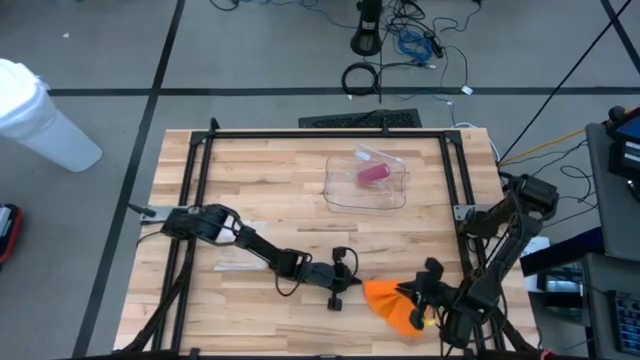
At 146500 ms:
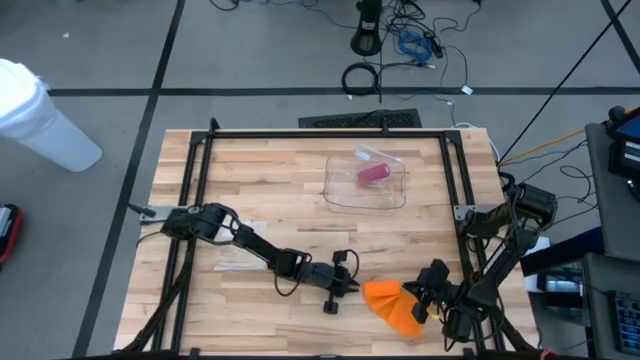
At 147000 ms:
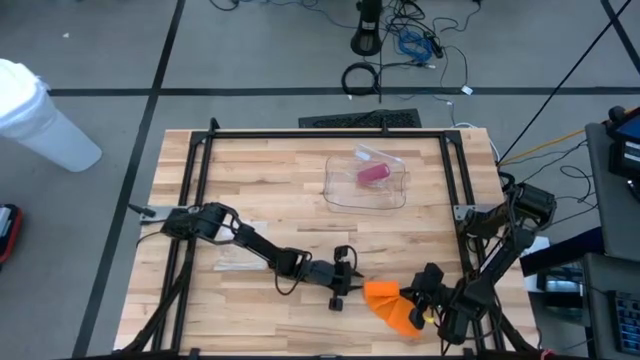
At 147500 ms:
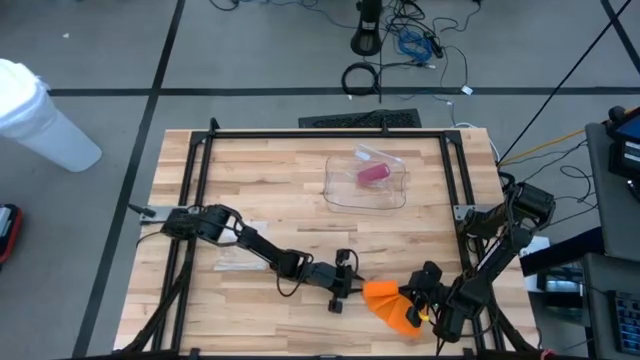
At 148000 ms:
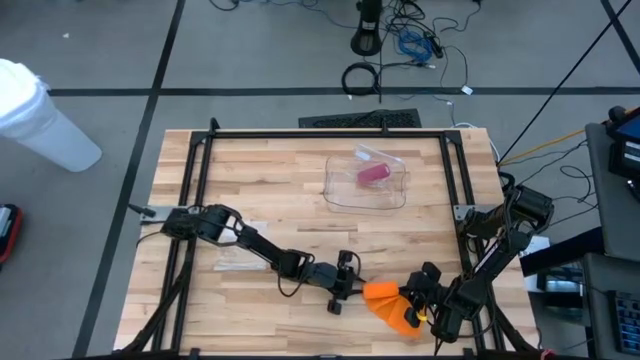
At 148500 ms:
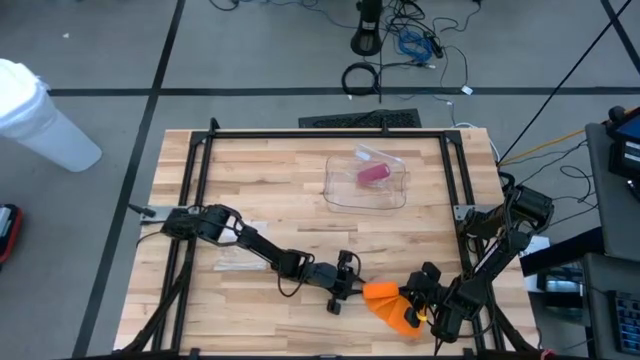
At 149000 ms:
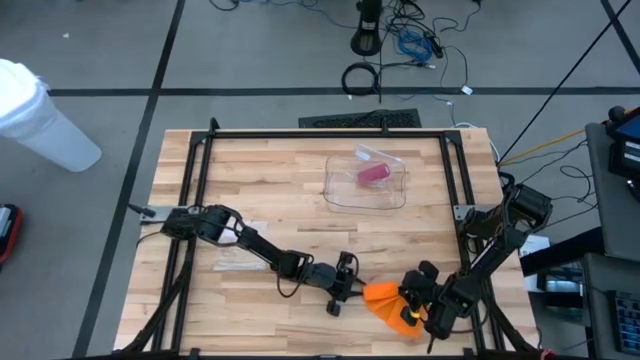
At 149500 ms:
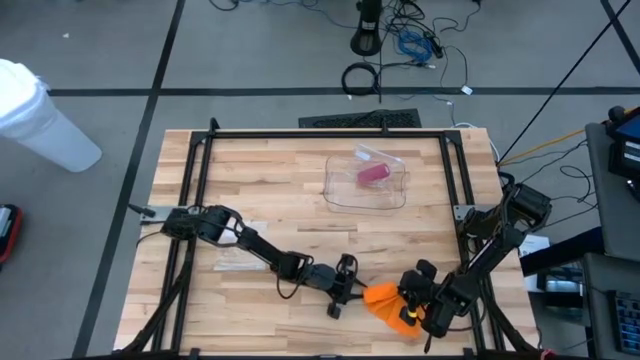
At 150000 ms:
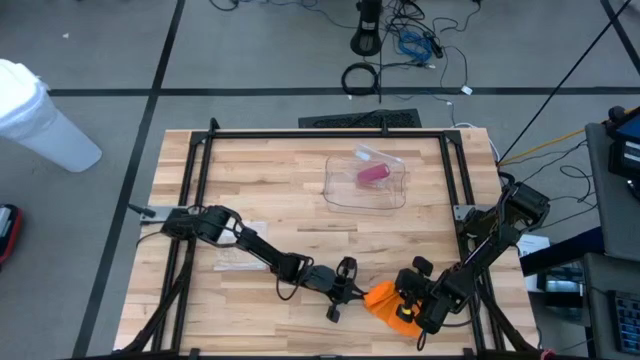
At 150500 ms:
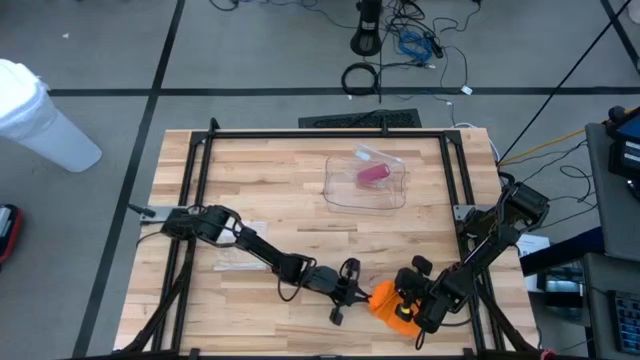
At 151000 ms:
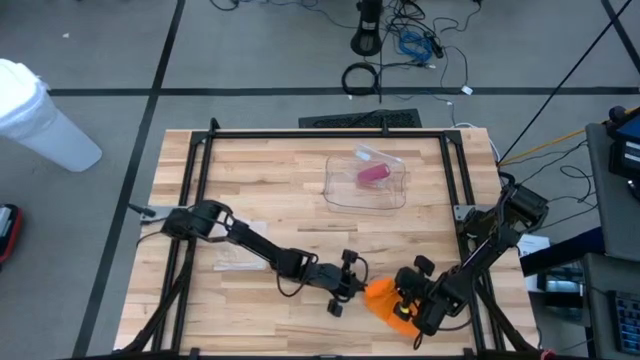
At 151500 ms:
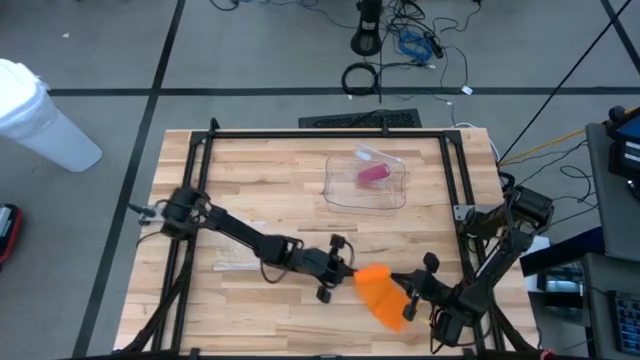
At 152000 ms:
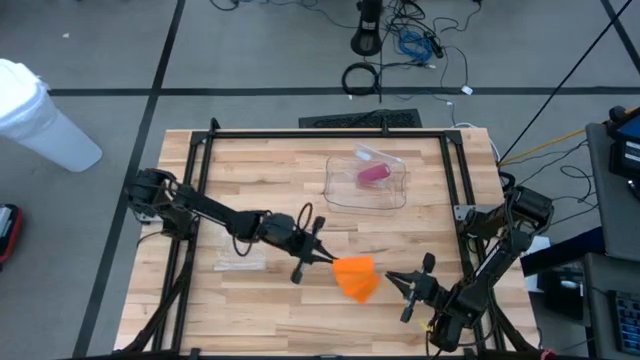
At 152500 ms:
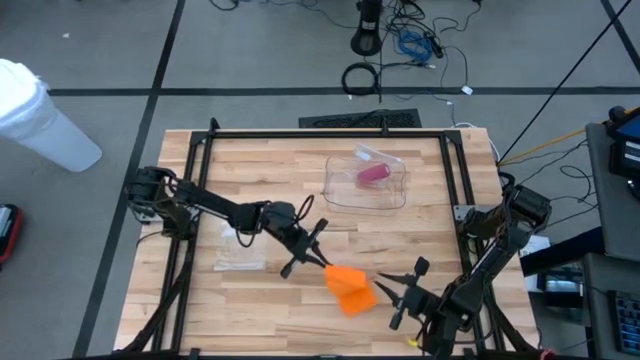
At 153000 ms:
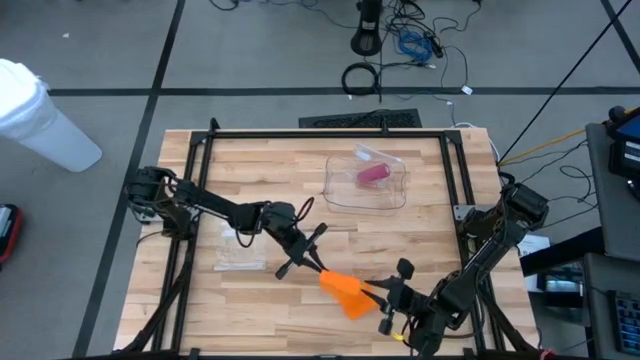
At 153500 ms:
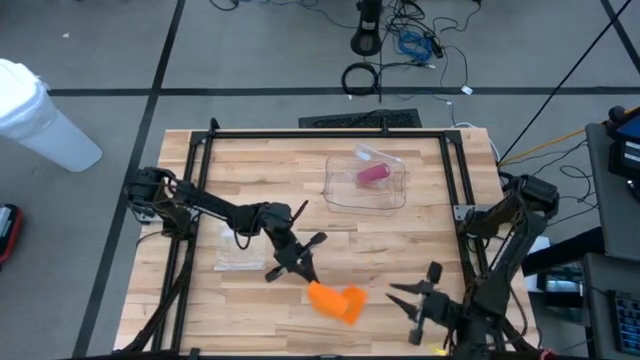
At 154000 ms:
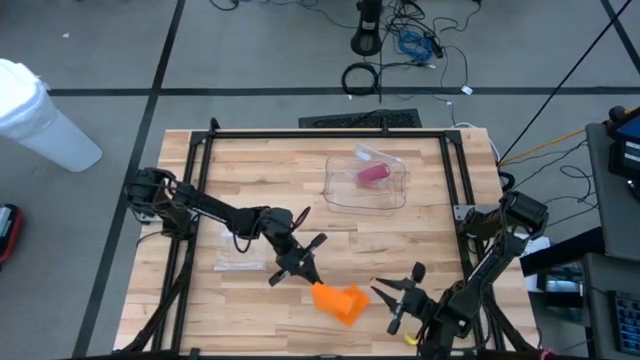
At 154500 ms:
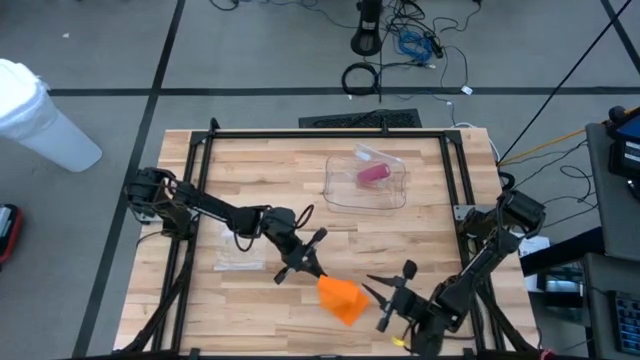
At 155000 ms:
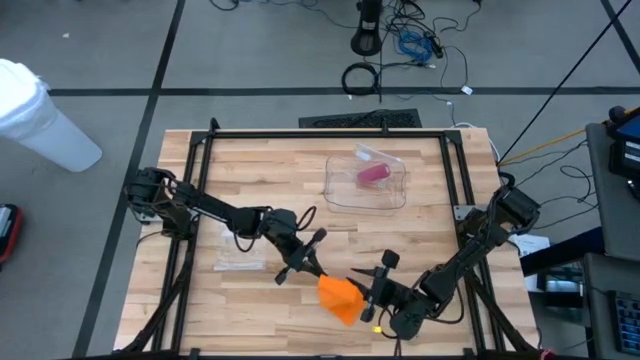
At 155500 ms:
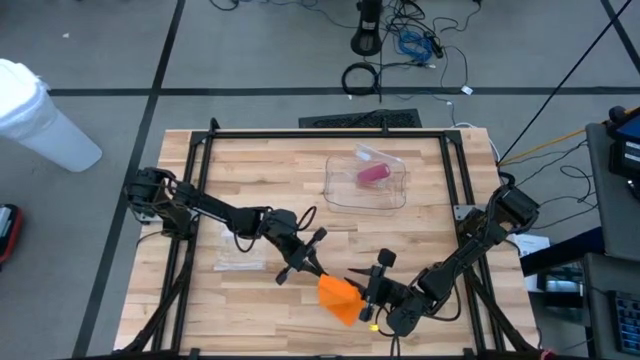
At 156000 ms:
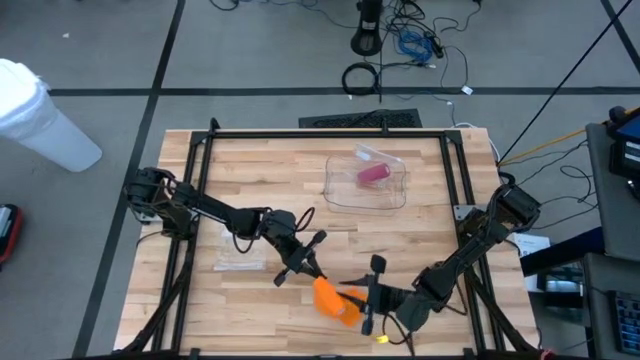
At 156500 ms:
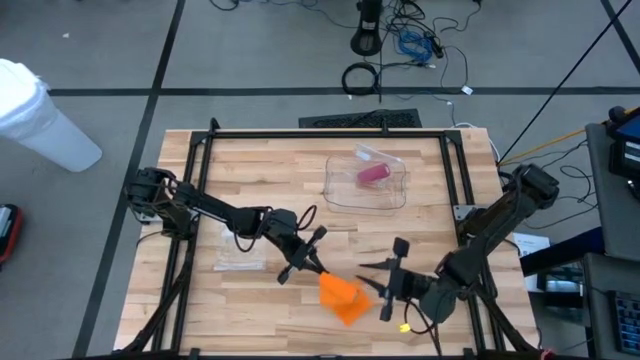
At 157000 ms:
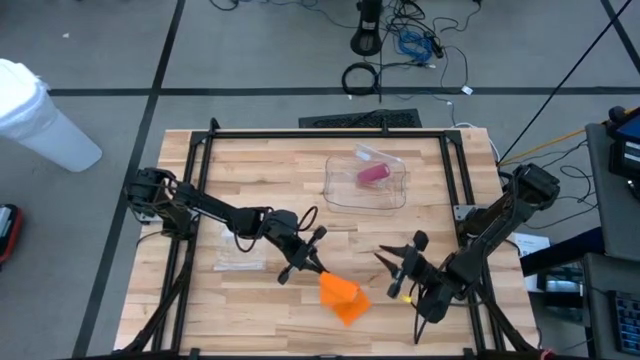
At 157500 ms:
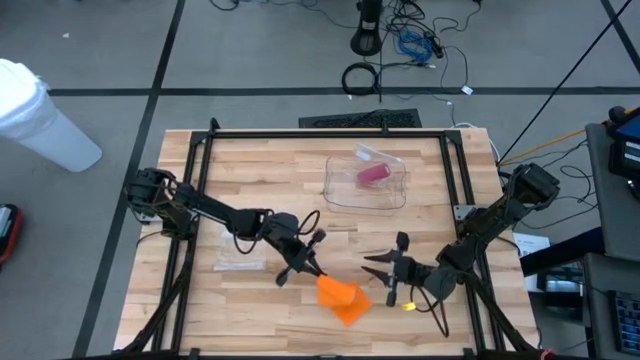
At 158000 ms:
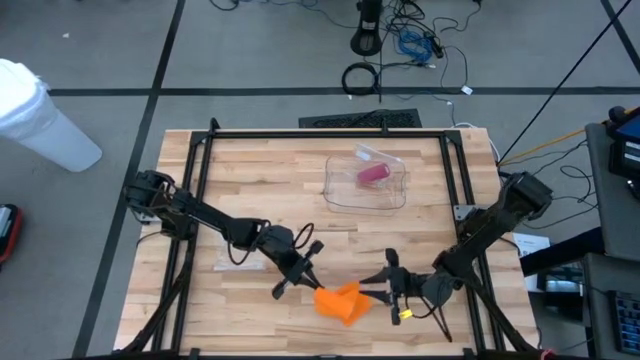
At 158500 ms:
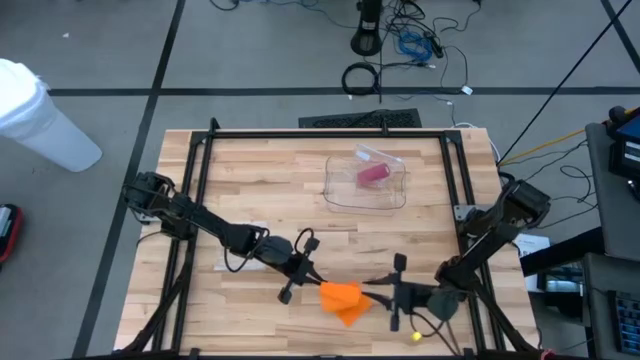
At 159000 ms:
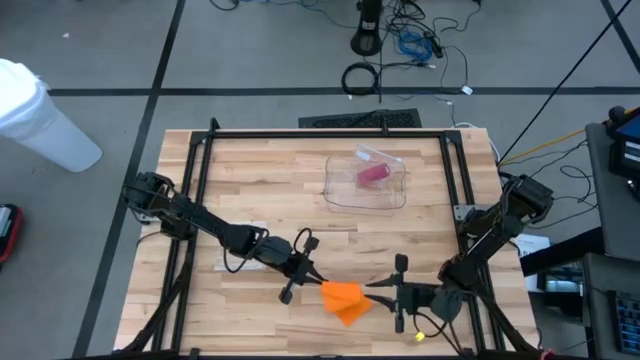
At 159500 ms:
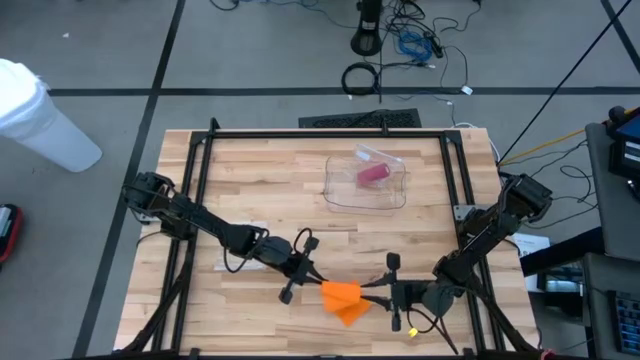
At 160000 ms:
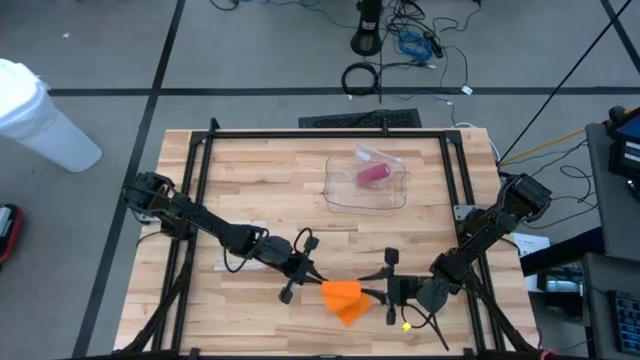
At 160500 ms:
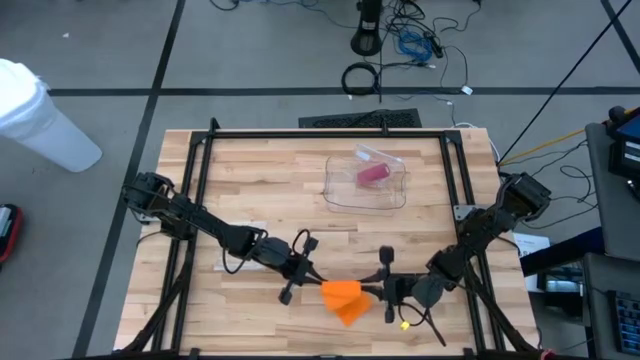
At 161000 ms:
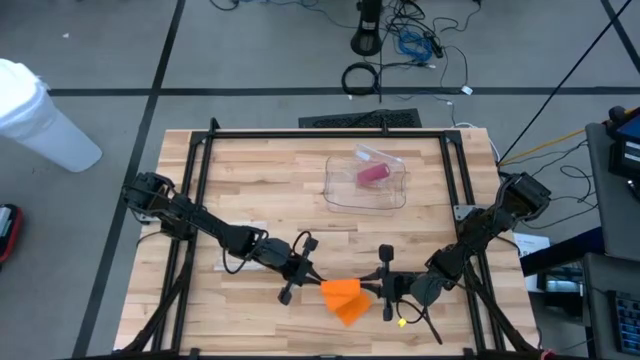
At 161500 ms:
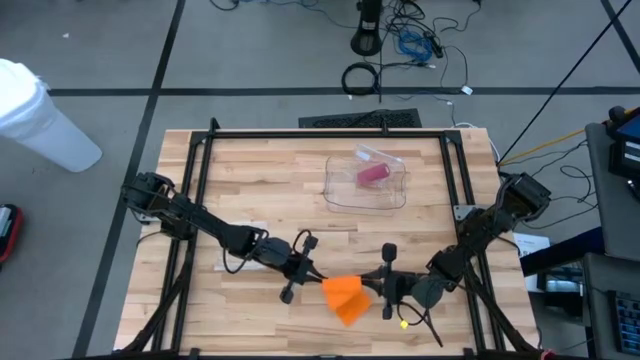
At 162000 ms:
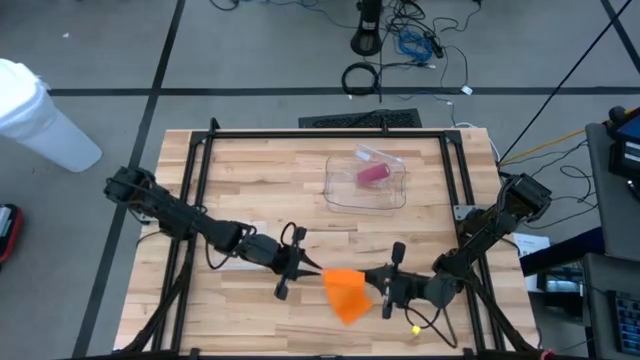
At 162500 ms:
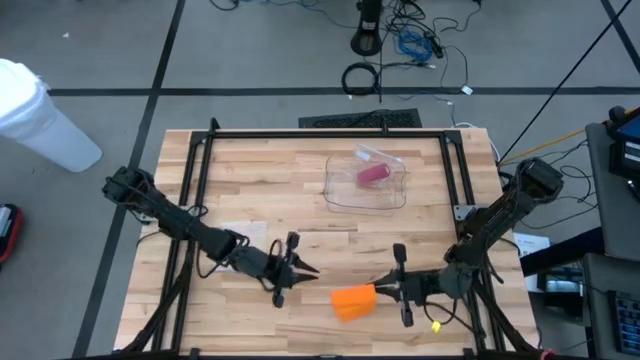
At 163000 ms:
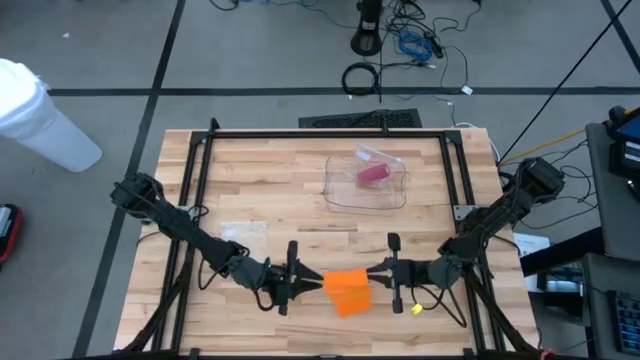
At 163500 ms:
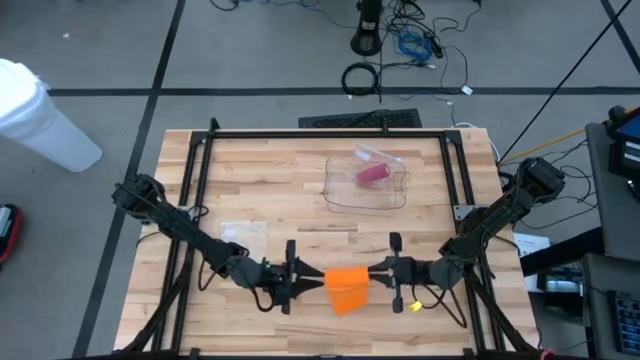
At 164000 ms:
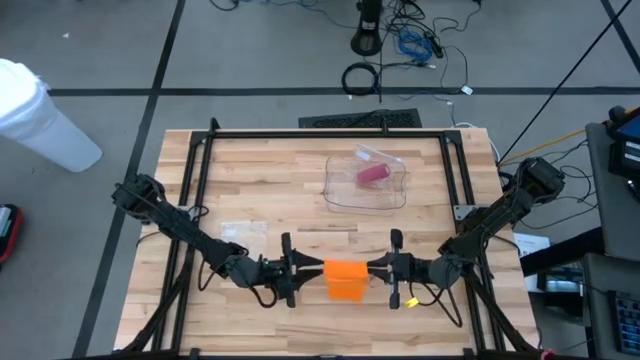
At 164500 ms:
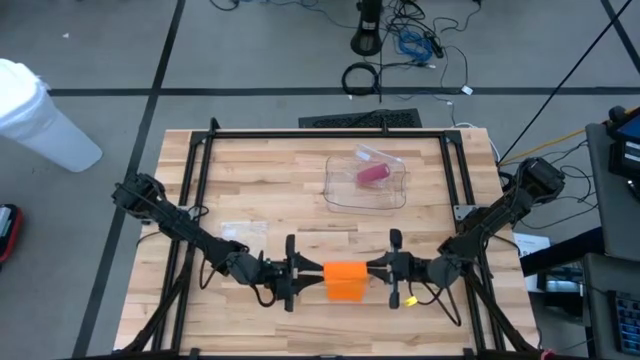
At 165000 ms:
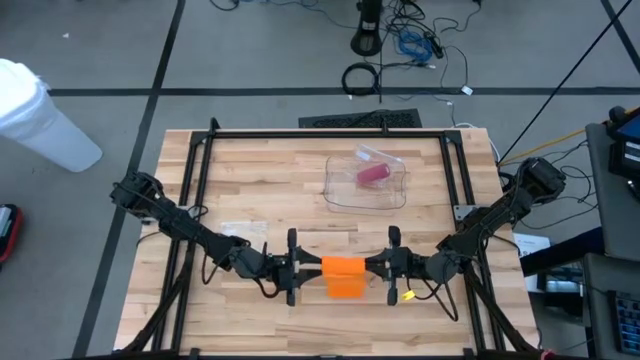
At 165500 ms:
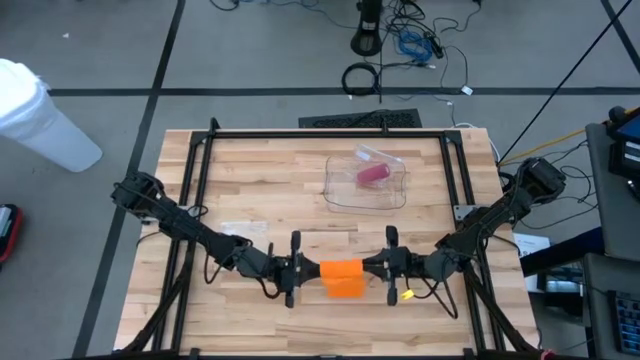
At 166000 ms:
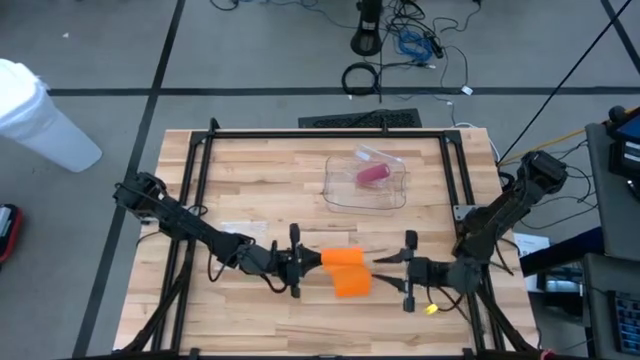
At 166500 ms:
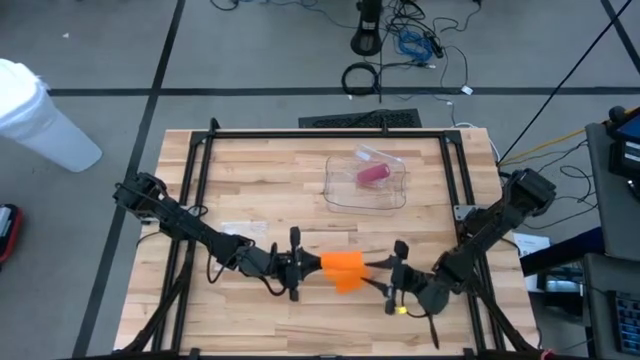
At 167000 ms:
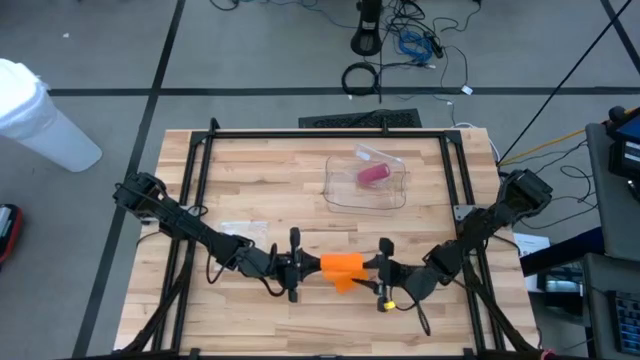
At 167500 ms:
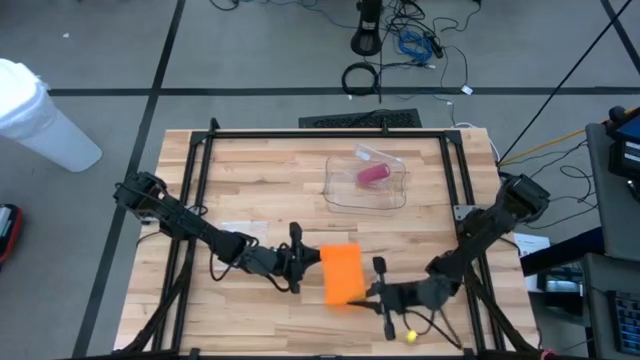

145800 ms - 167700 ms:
Task: Roll bandage
Roll the orange bandage
